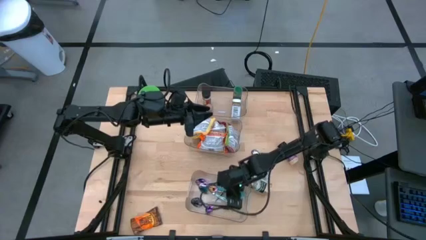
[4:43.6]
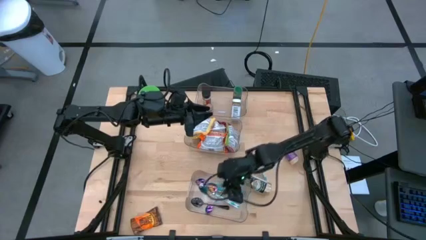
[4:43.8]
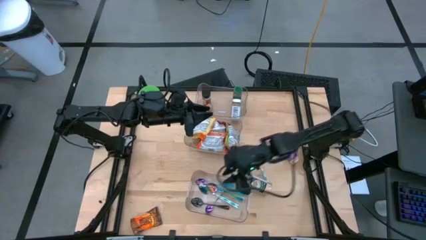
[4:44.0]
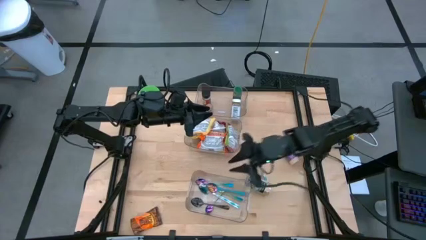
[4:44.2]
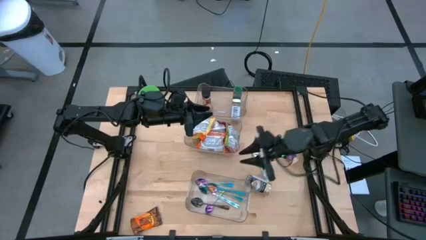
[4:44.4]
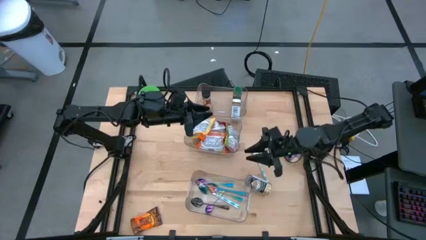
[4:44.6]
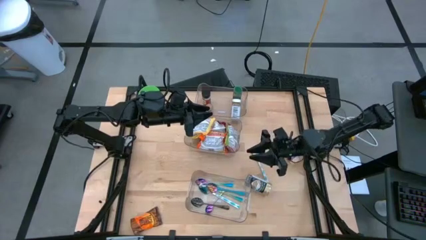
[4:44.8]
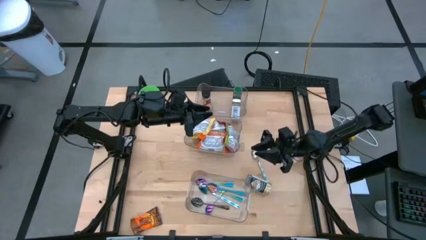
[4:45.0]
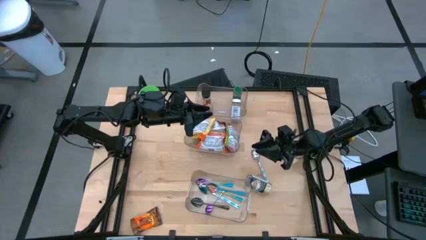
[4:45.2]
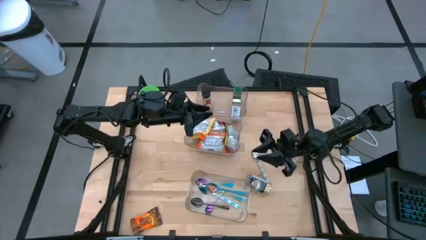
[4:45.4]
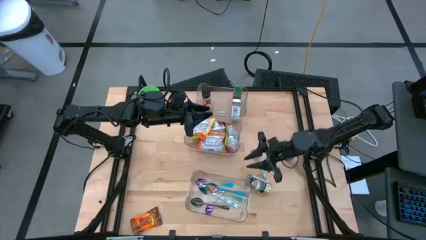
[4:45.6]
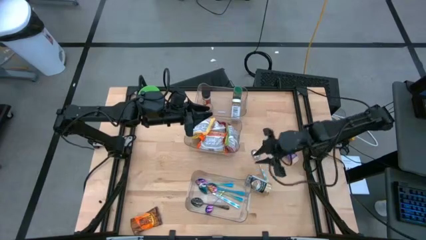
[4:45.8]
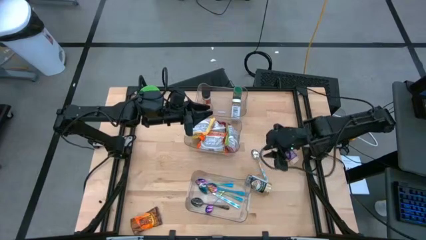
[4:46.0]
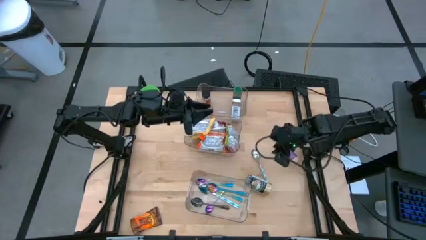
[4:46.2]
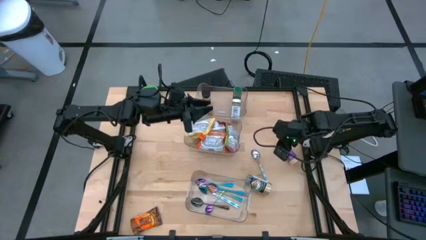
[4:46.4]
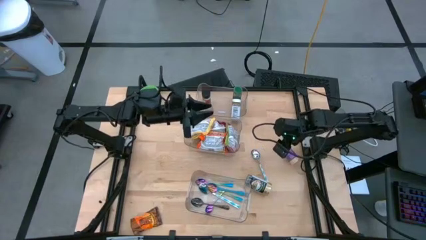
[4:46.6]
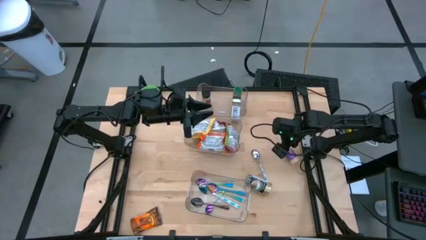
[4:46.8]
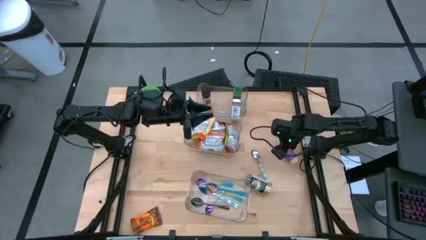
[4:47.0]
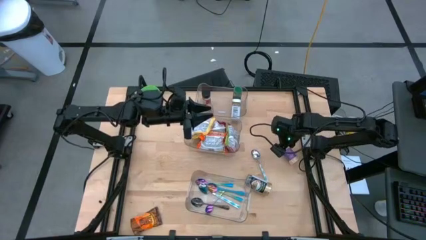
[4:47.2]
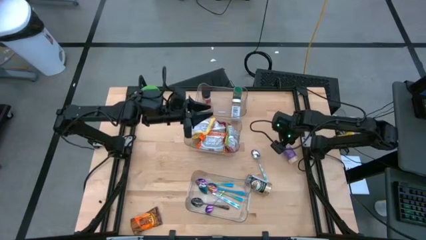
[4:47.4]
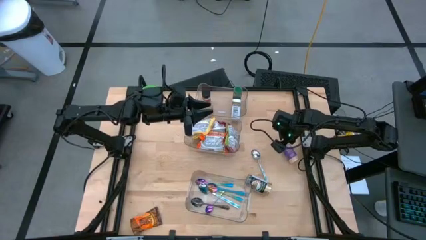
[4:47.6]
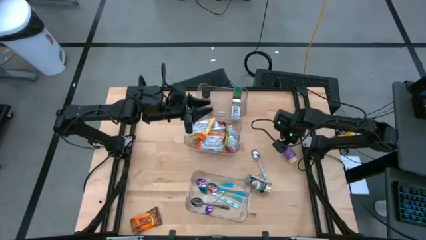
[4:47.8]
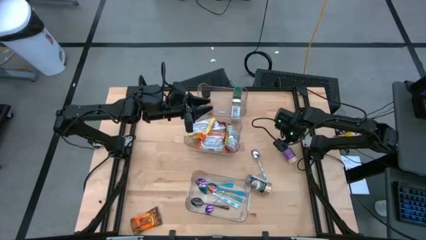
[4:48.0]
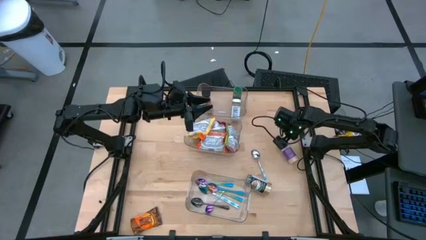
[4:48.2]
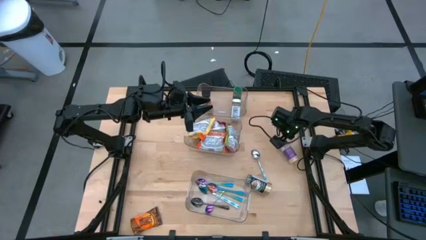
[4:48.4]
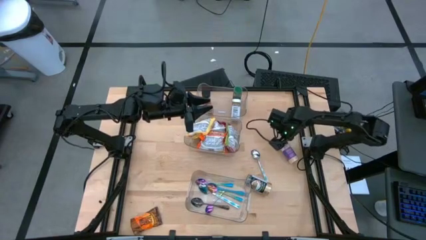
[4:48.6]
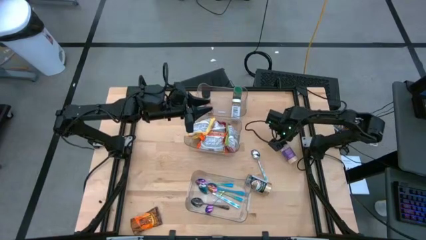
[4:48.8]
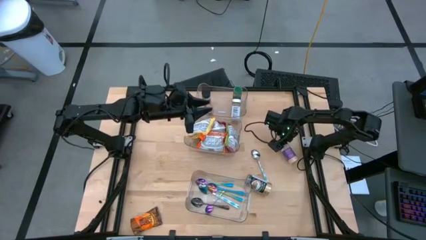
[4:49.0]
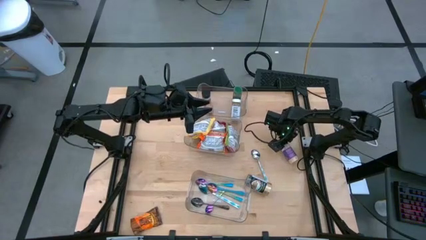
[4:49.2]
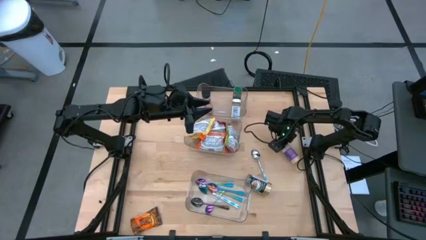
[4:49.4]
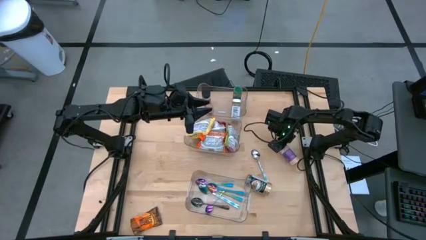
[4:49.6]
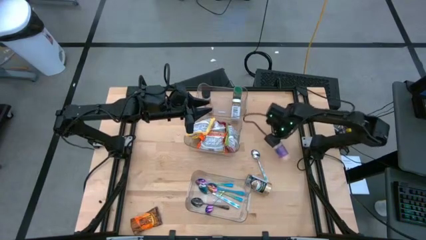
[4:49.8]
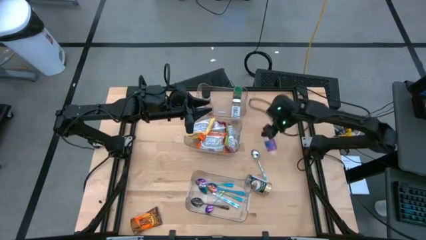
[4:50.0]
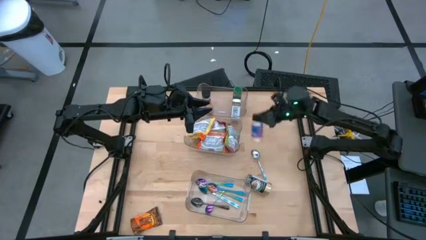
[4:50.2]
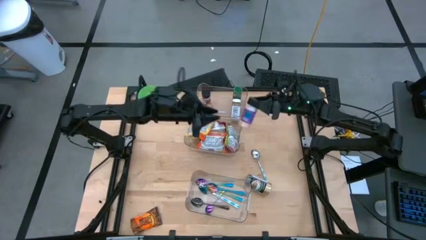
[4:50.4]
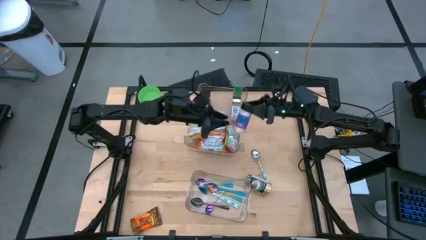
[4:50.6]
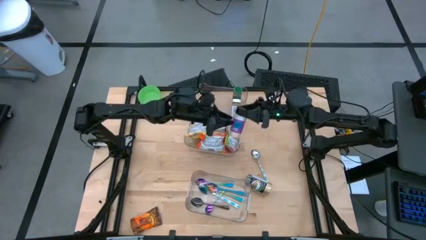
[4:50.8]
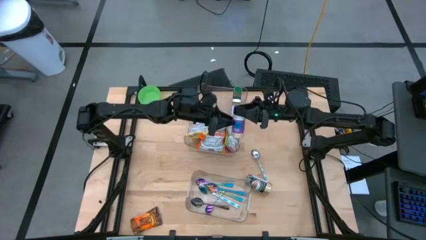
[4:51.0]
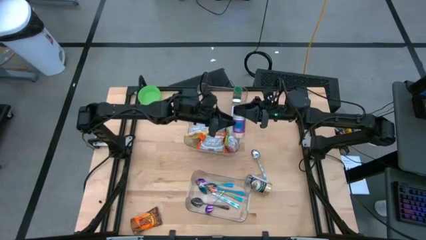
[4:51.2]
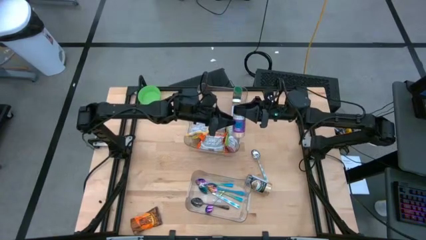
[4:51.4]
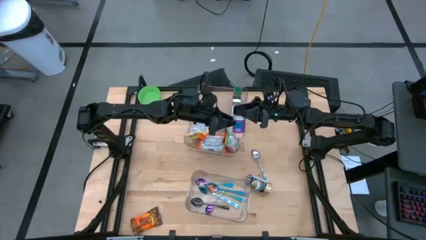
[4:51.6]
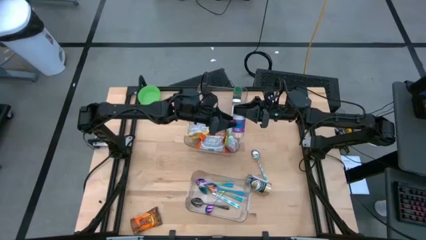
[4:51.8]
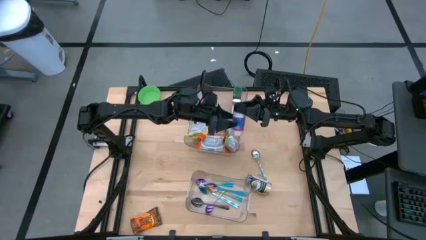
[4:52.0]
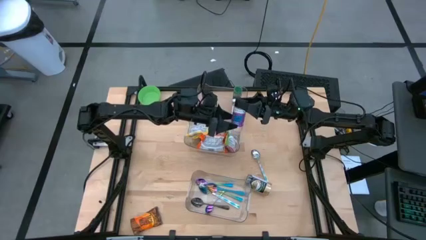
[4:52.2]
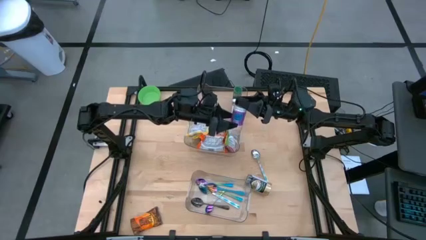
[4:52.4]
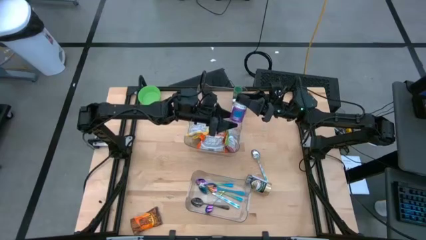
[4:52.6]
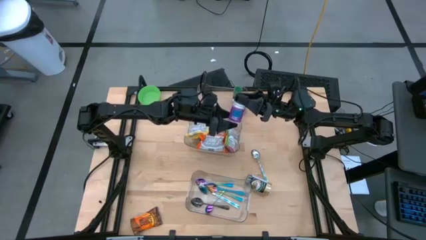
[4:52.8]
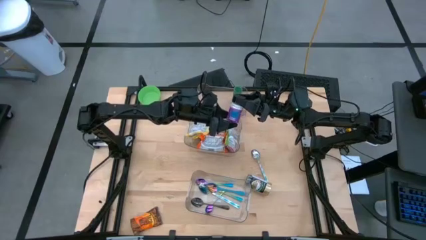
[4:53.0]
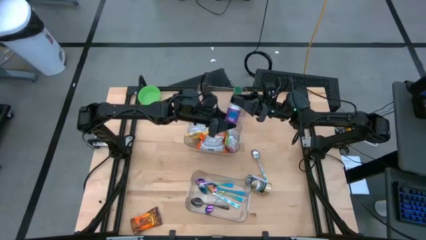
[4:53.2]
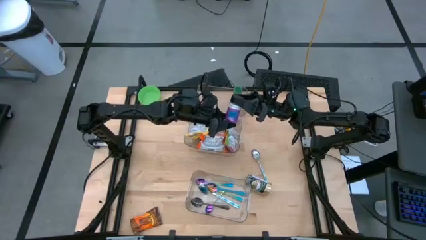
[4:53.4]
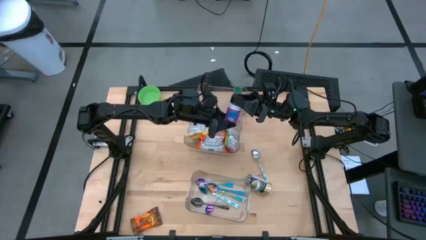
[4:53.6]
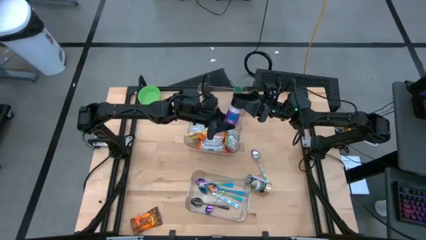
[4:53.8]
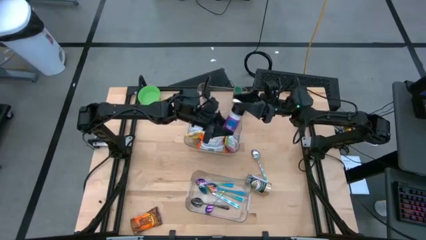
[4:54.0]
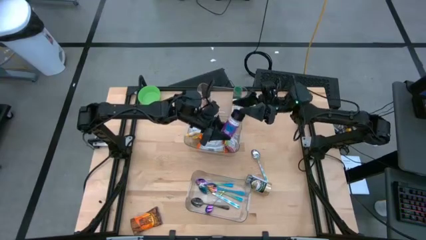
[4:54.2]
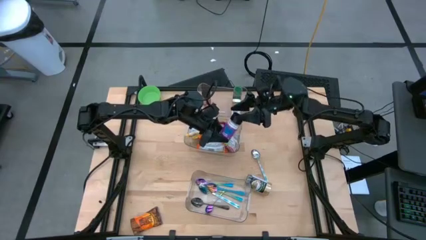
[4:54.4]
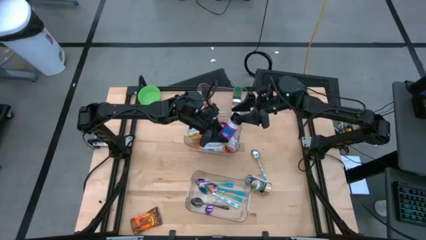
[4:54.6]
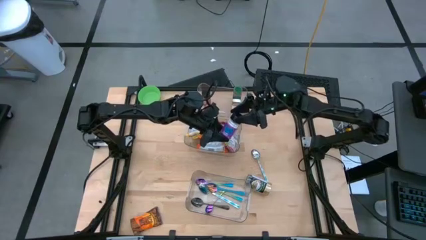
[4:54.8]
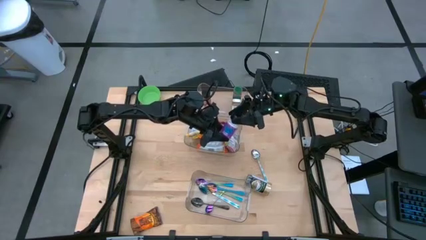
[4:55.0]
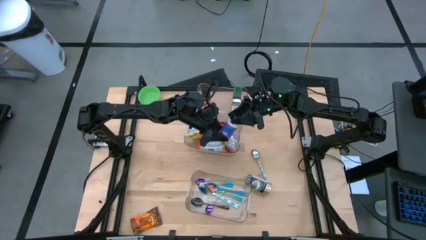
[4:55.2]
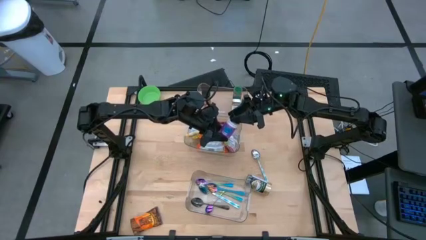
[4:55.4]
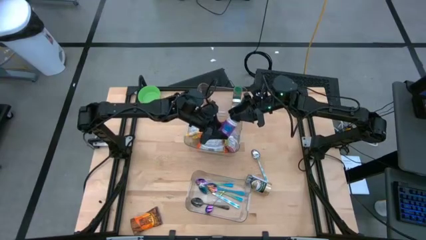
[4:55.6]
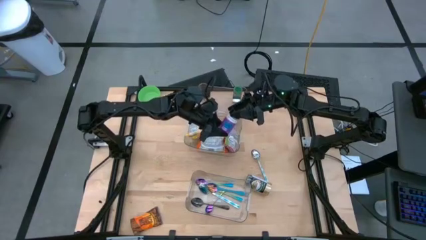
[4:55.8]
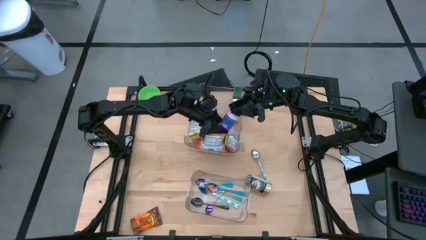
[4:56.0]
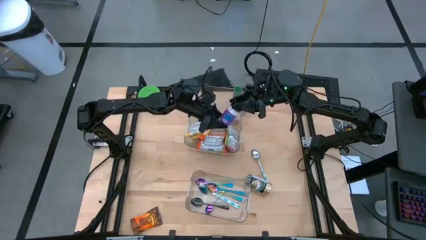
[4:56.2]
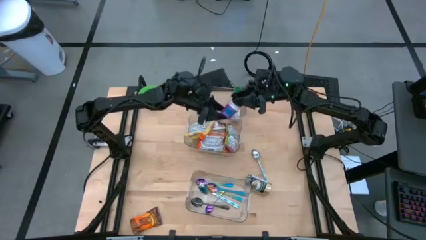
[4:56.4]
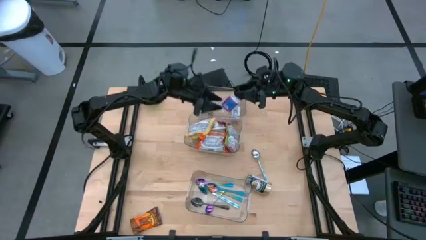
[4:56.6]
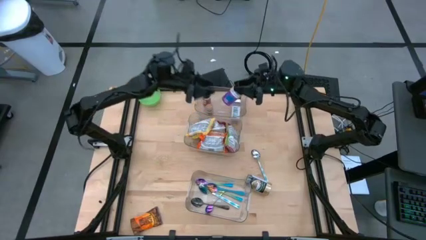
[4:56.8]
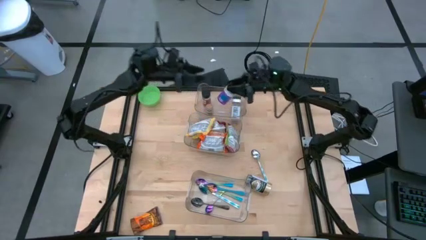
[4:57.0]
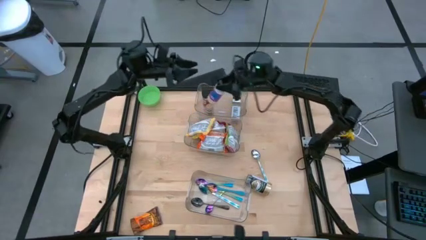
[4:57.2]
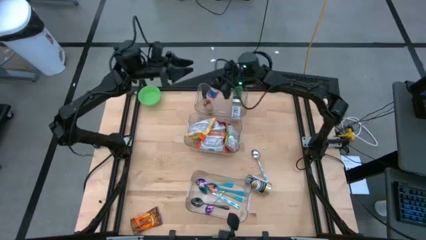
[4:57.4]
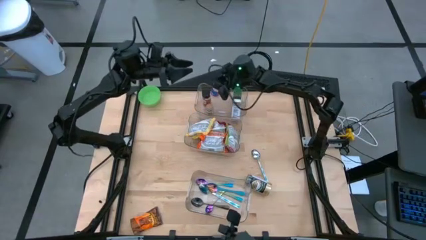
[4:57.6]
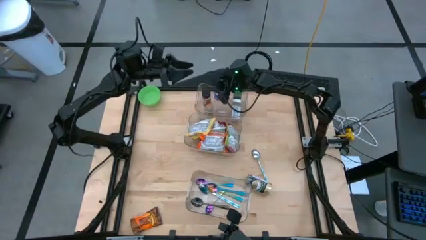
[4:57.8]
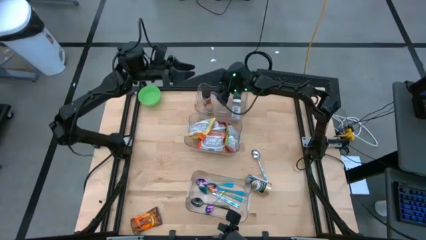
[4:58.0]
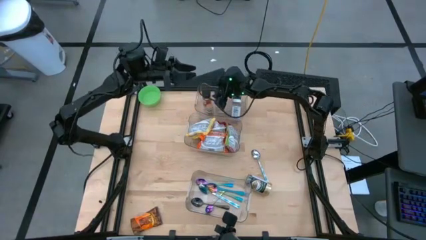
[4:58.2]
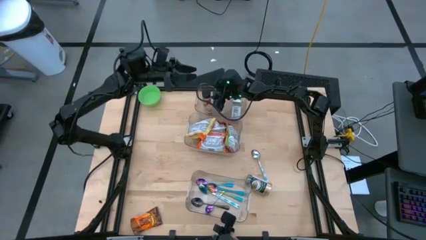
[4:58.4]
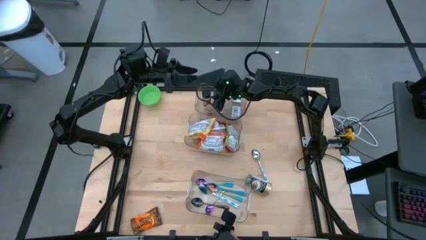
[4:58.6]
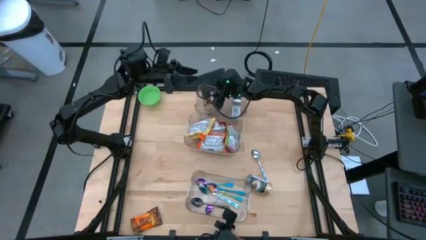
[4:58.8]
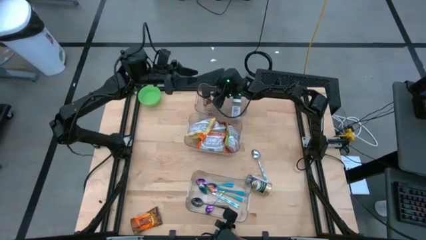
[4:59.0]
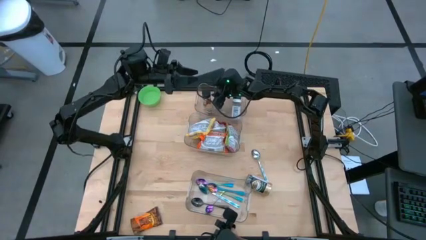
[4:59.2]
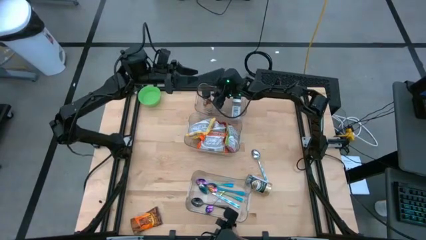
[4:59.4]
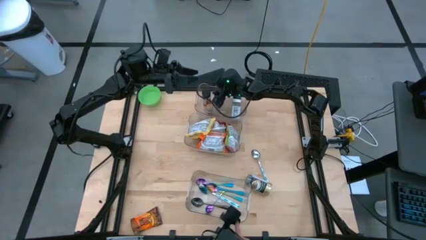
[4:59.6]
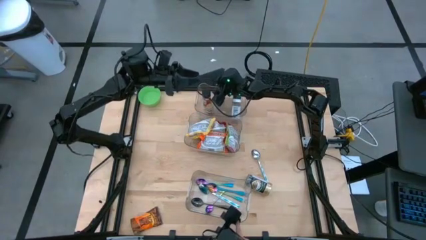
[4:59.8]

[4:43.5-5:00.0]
Task: Pick & Place Food Item
Put the violet seasoning bottle into the top transparent bin
